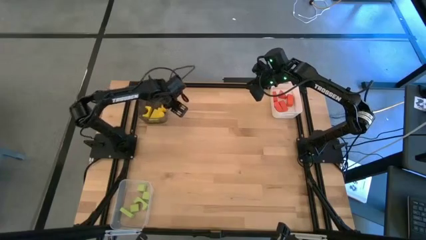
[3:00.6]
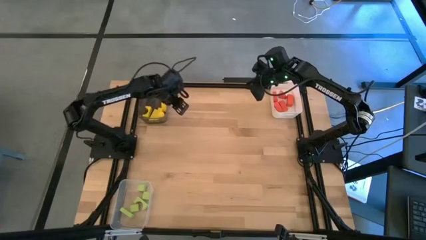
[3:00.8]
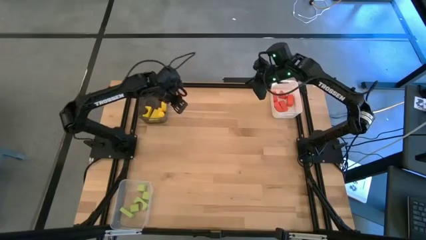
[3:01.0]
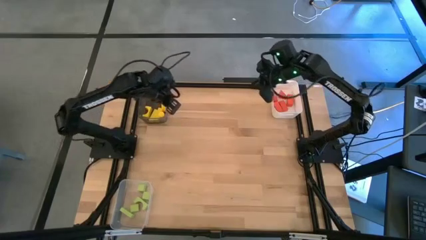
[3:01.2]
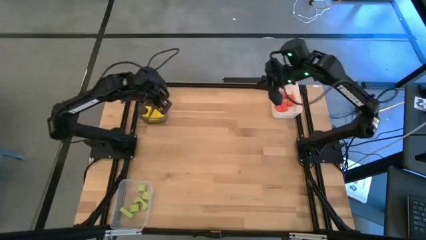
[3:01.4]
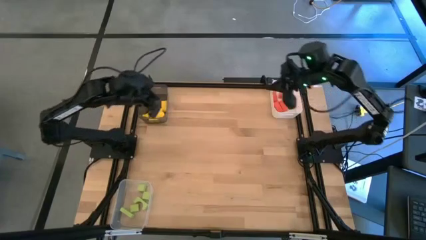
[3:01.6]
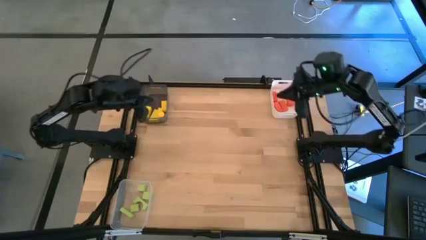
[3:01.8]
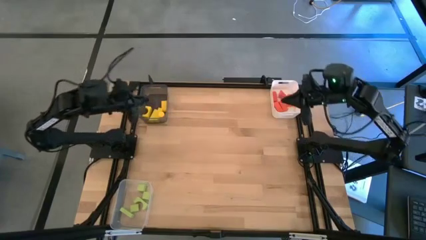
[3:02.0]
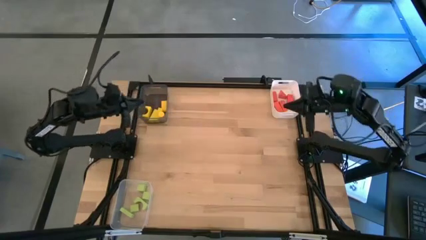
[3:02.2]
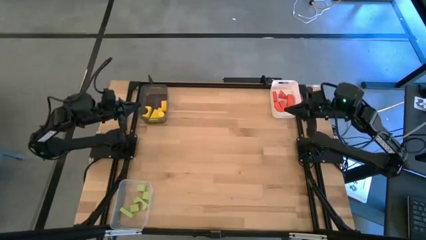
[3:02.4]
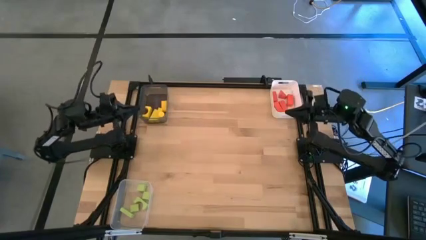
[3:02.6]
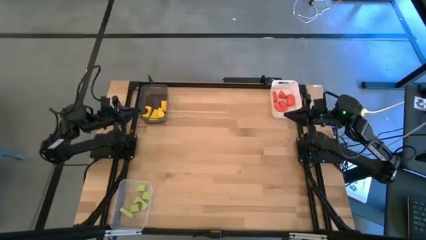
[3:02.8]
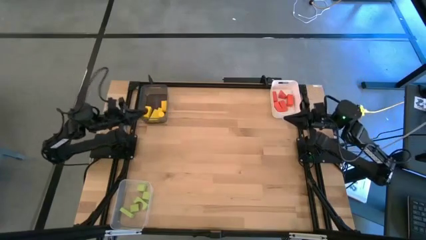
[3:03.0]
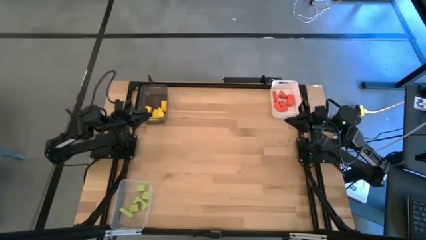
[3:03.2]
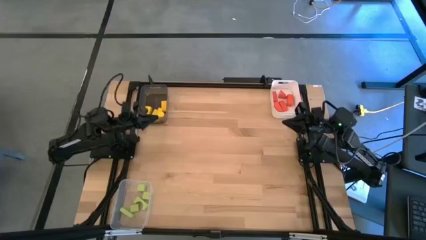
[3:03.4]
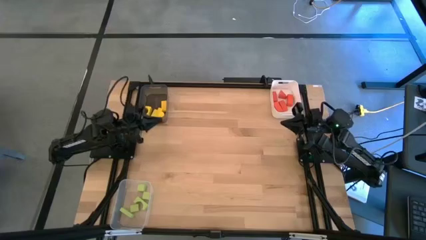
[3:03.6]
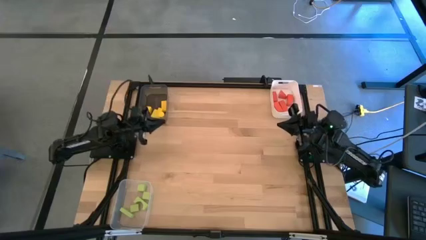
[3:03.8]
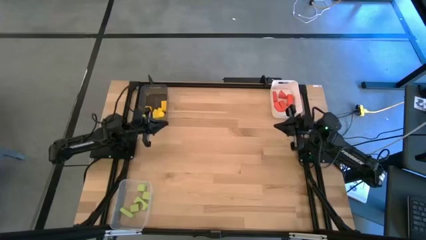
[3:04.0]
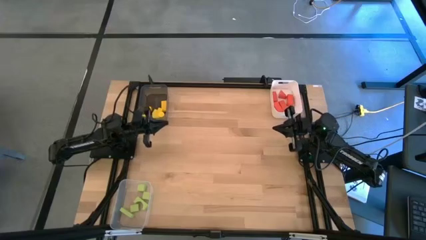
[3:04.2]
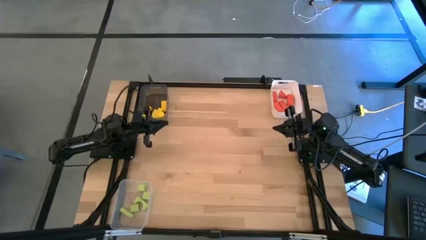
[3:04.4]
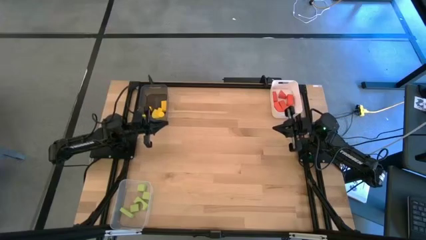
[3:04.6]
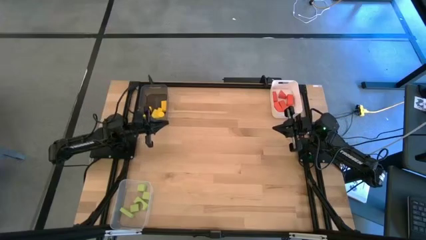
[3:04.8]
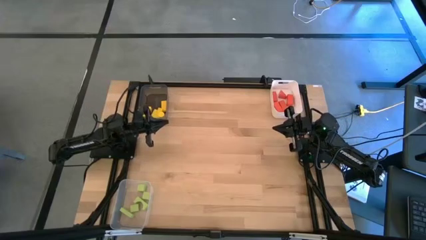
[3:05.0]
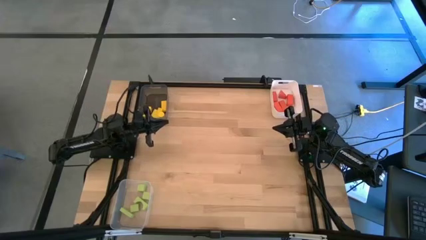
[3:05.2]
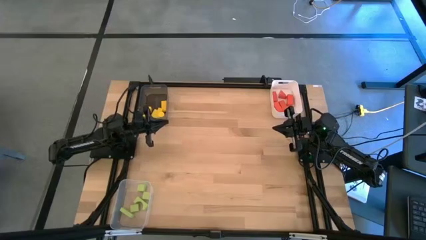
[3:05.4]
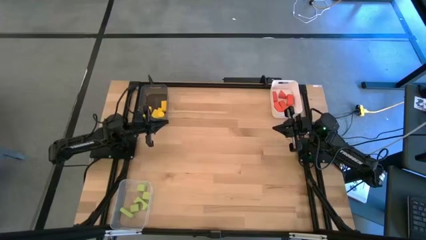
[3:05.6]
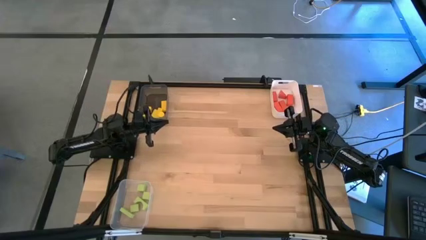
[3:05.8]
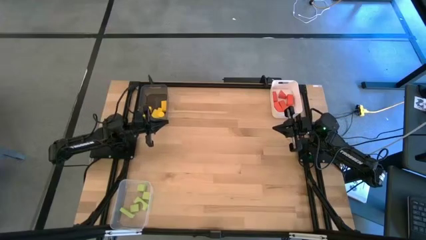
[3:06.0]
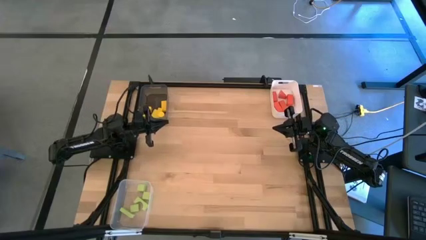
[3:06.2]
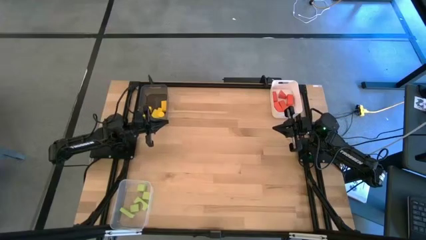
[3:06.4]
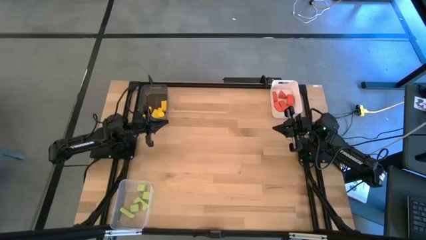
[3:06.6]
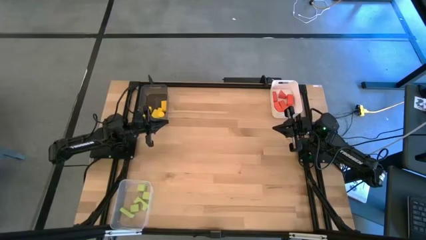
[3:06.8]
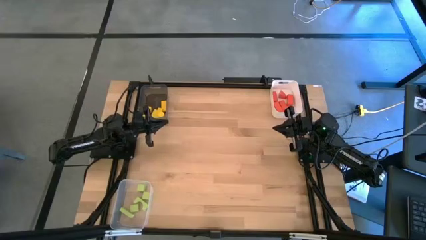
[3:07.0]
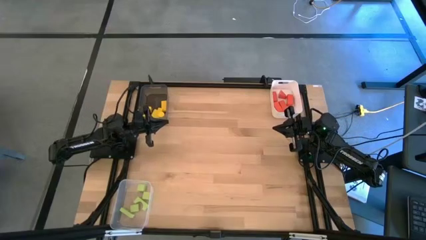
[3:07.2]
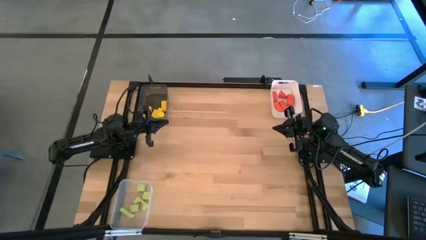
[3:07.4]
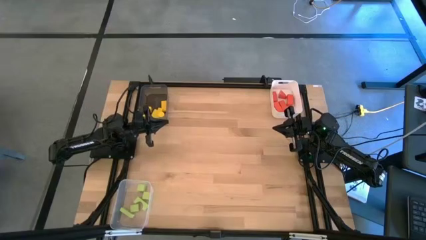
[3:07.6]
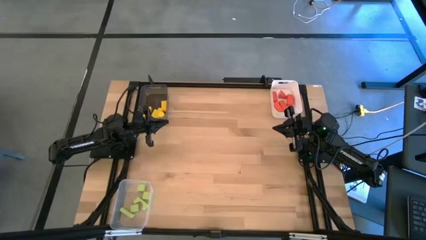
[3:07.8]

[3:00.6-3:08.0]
Task: Sort & place blocks by color
Return to Home Position

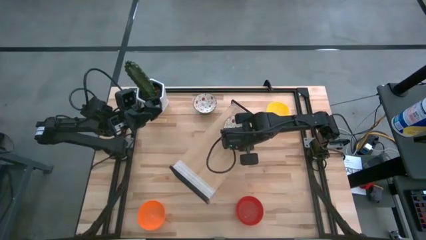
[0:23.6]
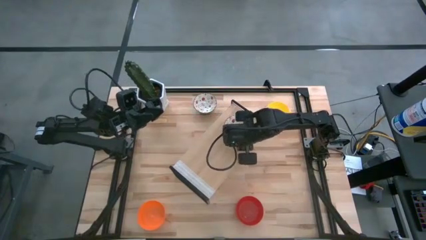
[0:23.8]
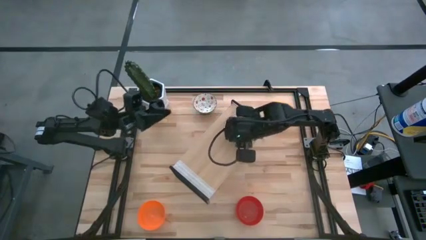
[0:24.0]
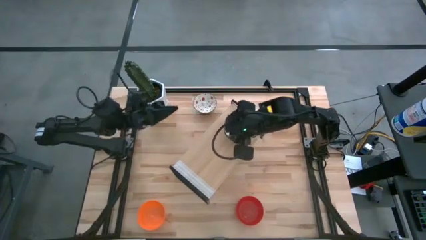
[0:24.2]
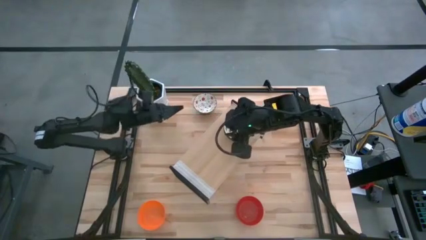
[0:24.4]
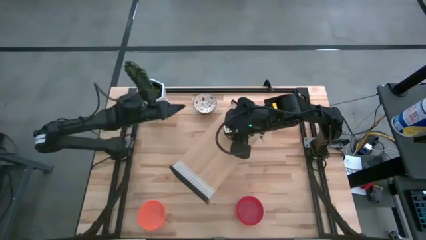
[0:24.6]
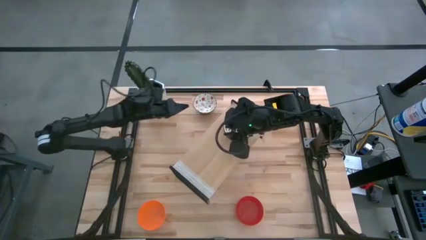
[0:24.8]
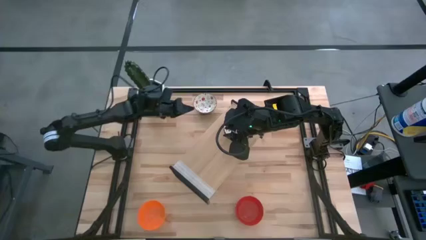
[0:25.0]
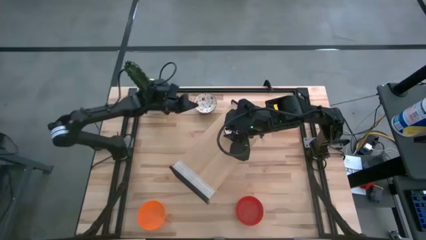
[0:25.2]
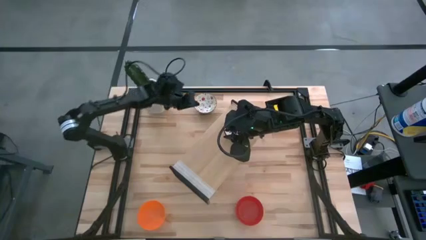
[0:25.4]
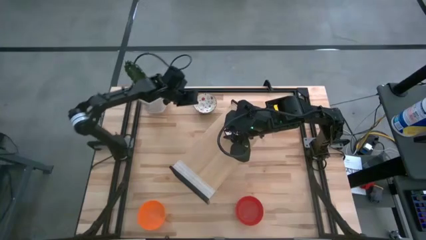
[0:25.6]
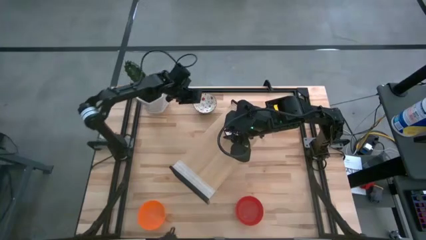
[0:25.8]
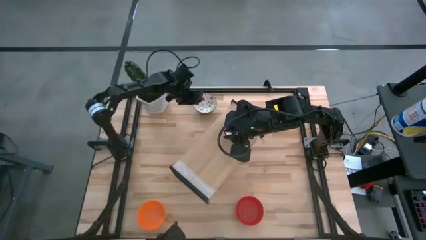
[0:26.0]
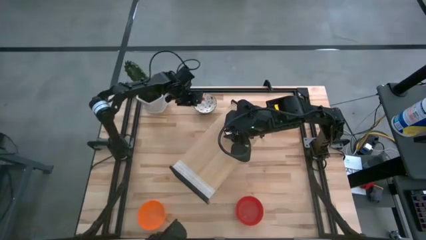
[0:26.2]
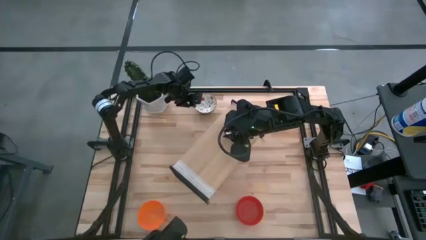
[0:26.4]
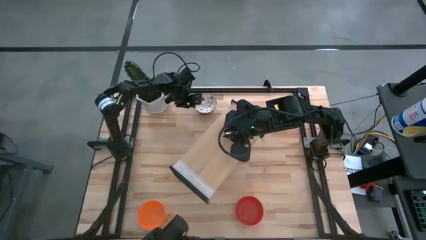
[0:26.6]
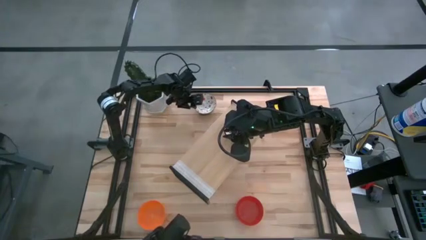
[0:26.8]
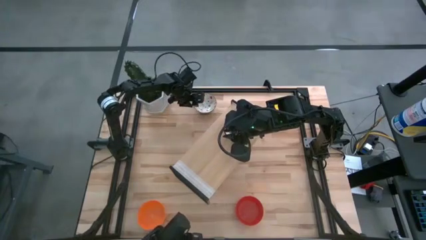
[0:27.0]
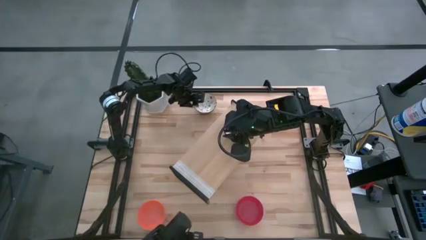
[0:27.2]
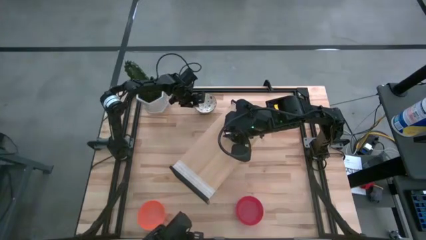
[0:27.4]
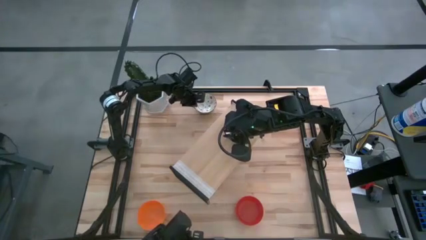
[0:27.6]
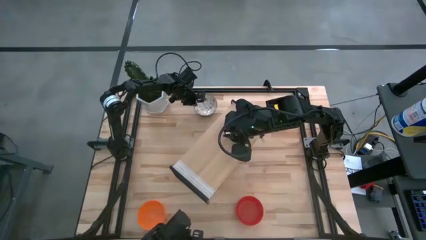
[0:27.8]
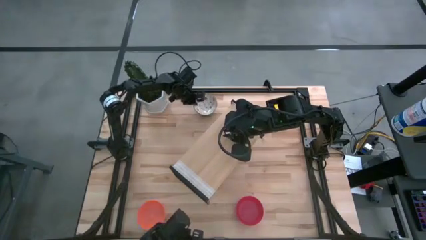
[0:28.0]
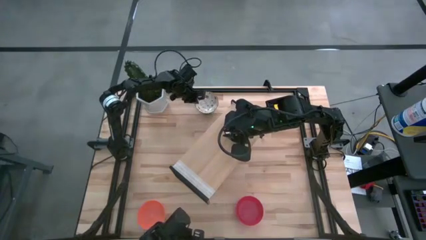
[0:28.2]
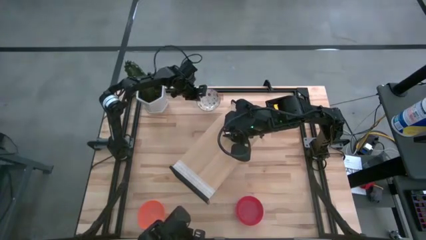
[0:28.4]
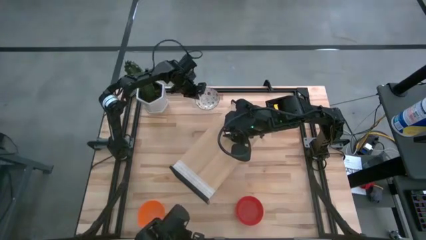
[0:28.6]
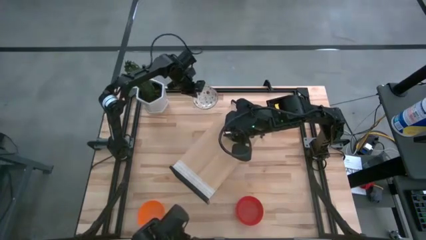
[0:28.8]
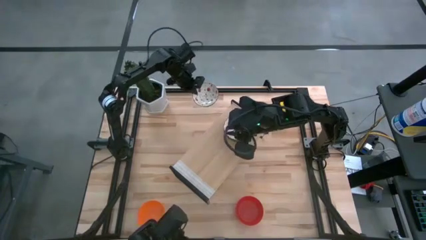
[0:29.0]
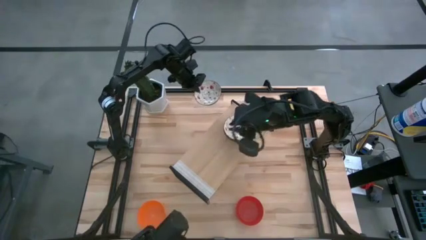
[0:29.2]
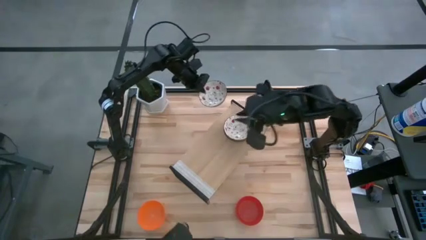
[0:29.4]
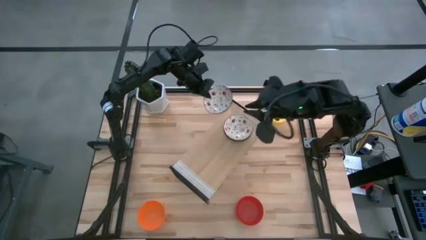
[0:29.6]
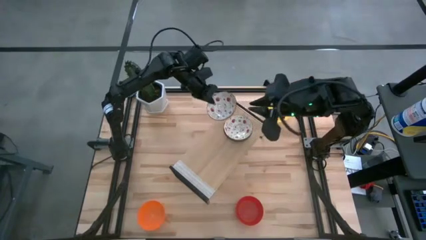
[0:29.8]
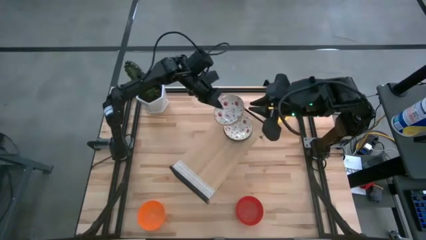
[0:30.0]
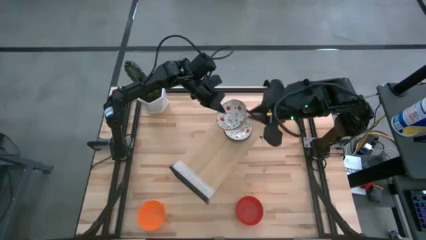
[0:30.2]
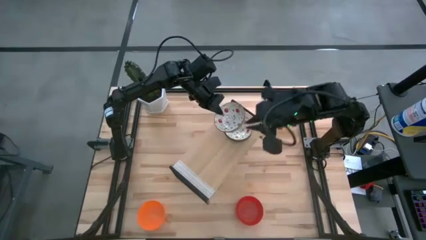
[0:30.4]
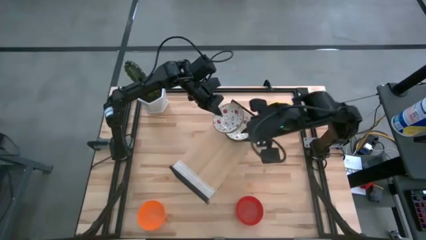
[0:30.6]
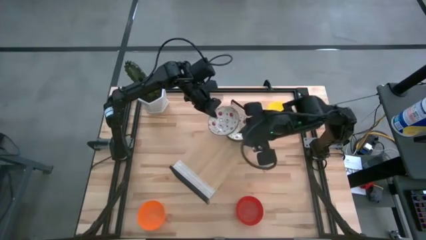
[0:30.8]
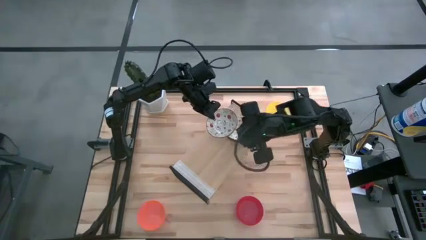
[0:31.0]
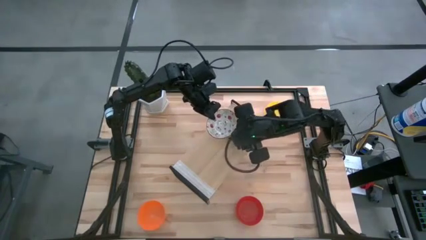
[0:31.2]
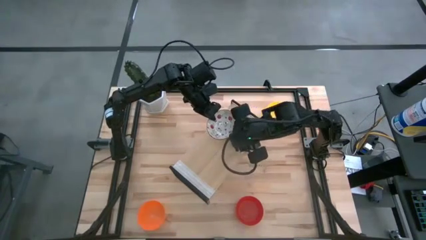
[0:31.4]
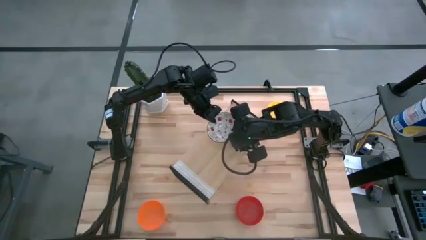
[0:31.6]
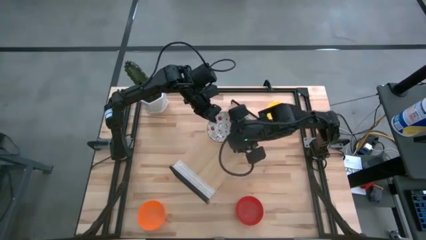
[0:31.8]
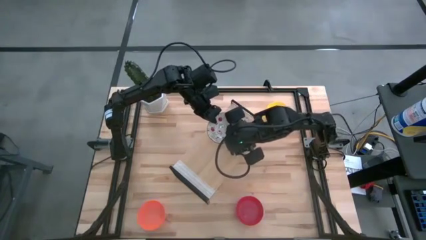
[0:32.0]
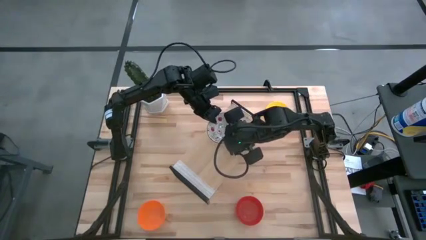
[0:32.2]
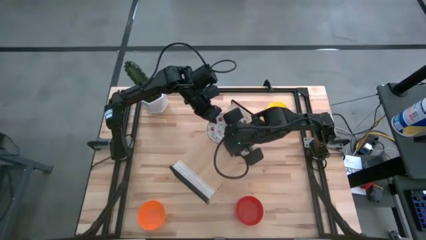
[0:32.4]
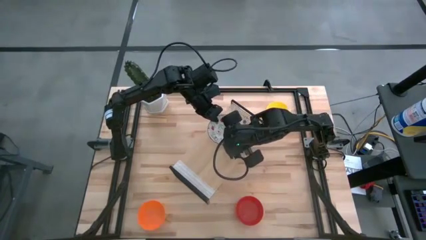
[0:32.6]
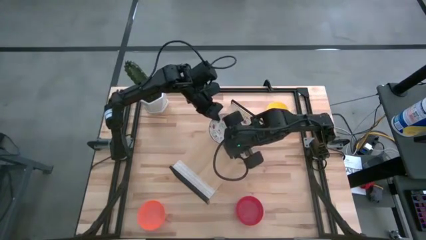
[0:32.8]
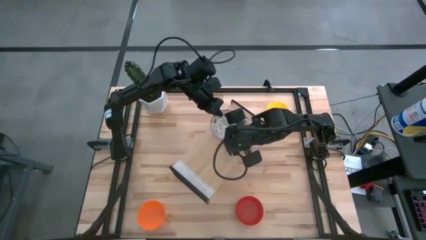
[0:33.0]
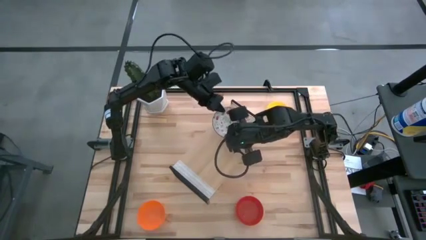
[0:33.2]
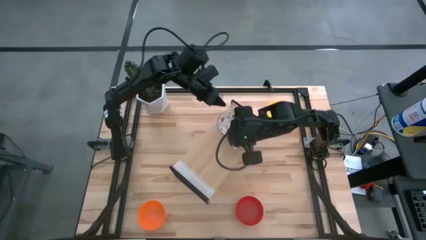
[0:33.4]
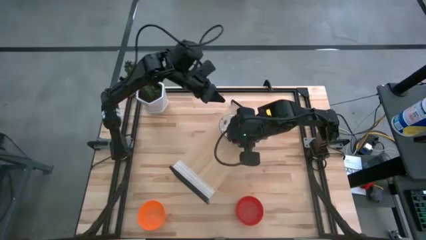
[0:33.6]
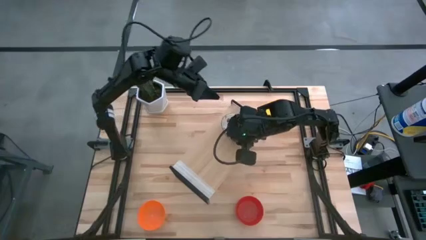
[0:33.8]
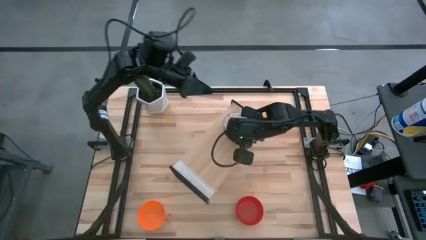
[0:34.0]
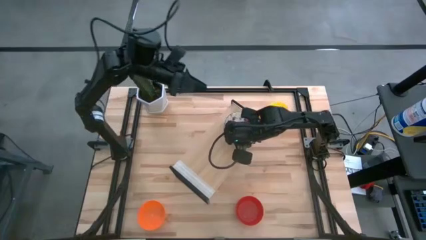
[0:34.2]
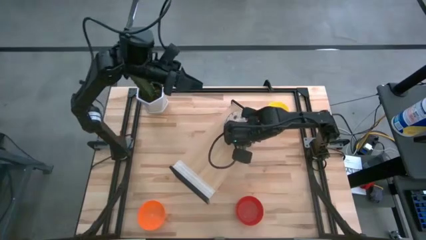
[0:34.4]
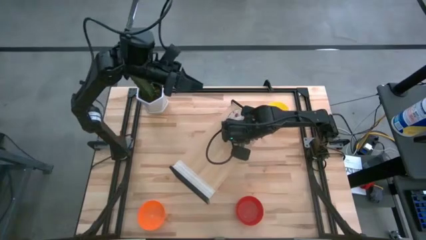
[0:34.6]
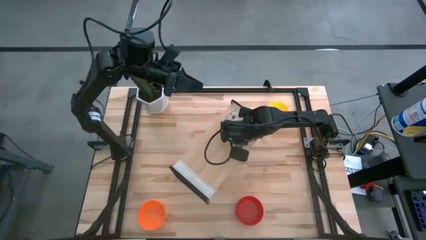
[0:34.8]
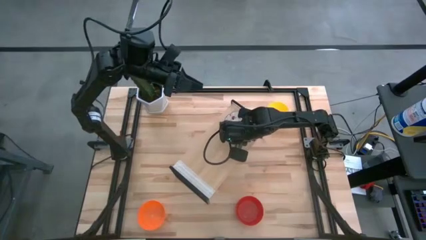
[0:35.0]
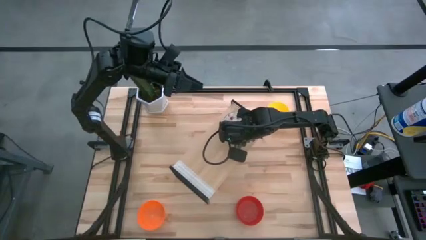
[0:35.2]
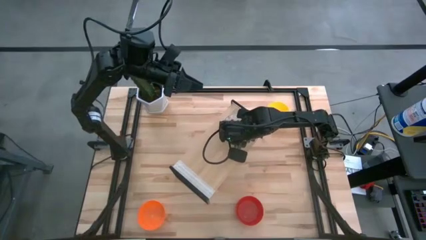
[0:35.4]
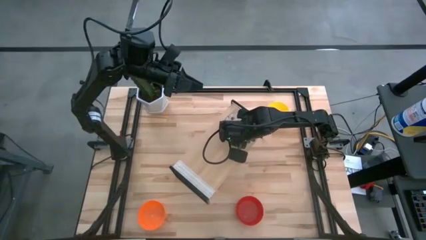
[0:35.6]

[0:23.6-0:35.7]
Task: Pick & Place Mini bowls
Stack the white patterned bowl on the white patterned bowl on the shelf
